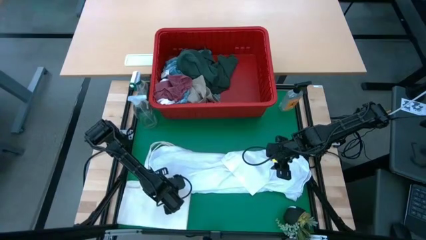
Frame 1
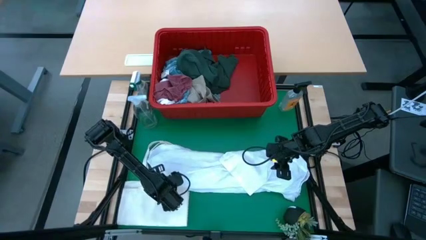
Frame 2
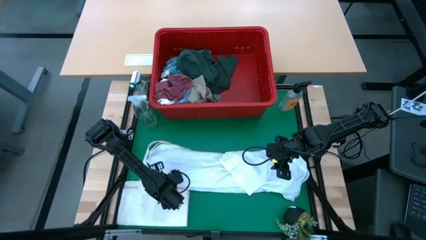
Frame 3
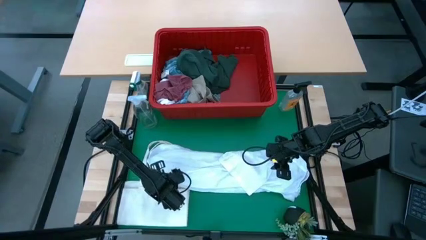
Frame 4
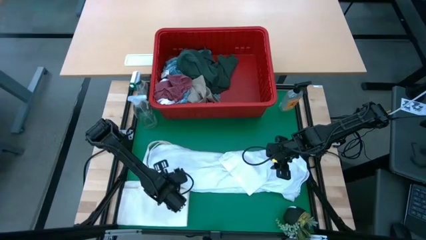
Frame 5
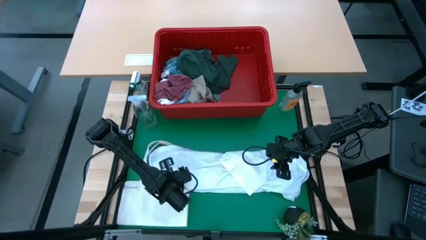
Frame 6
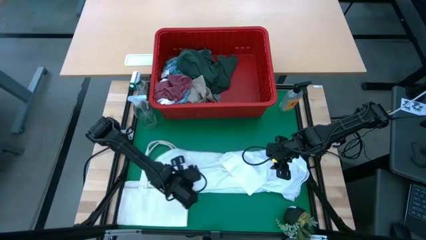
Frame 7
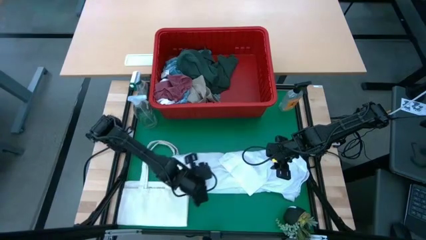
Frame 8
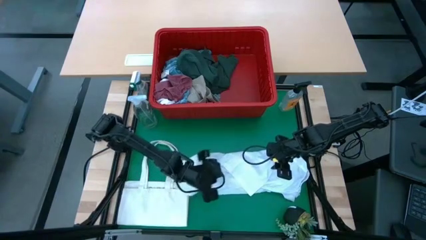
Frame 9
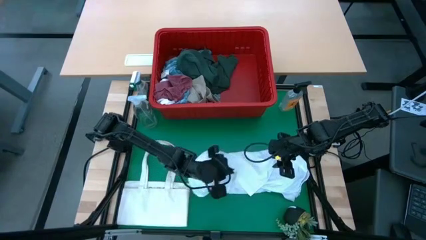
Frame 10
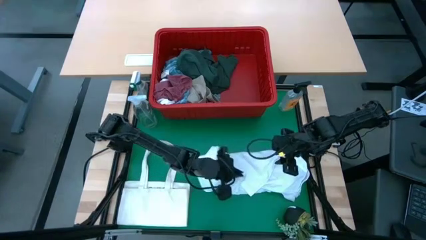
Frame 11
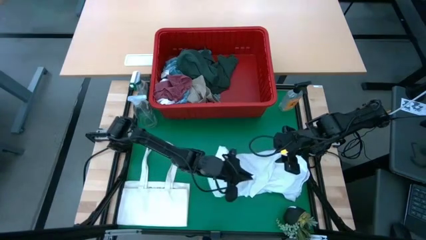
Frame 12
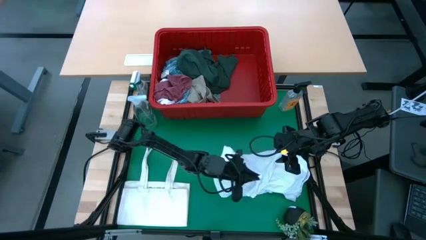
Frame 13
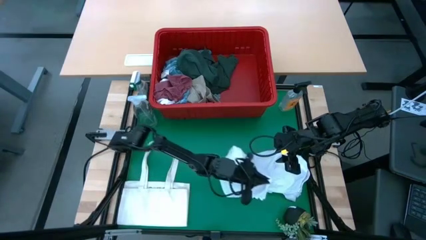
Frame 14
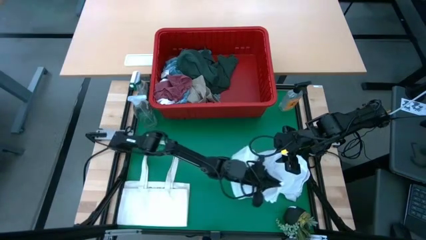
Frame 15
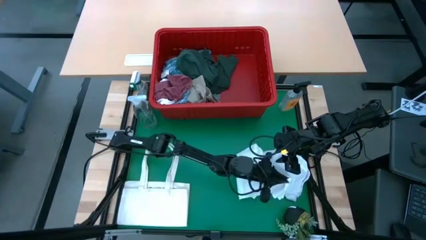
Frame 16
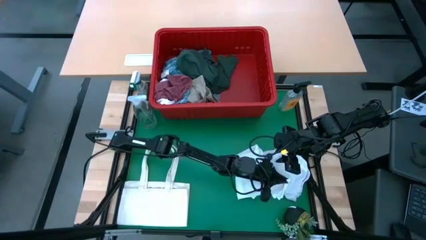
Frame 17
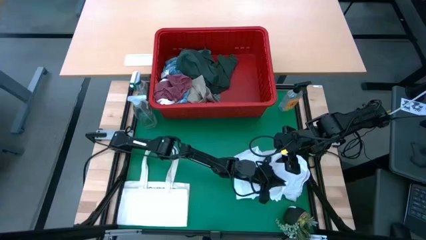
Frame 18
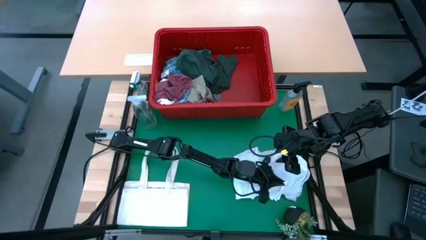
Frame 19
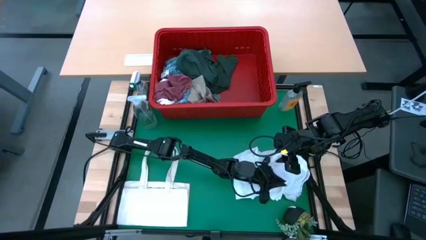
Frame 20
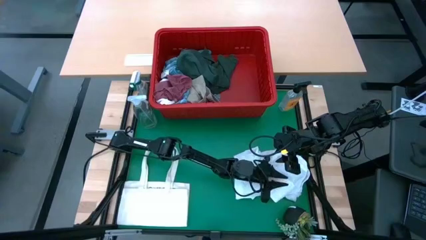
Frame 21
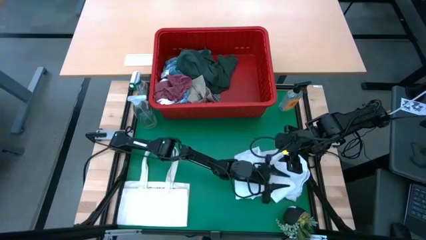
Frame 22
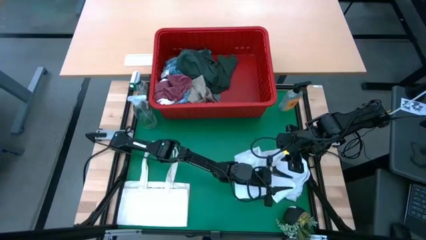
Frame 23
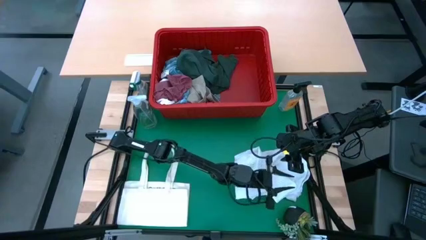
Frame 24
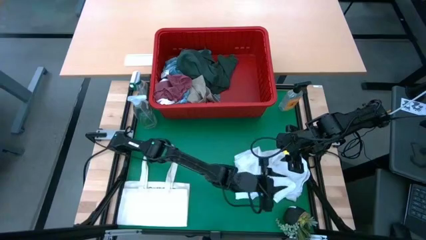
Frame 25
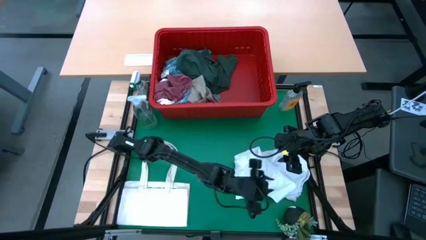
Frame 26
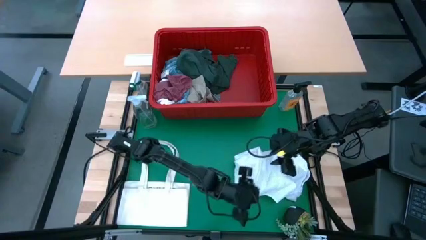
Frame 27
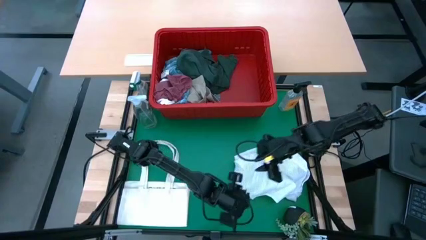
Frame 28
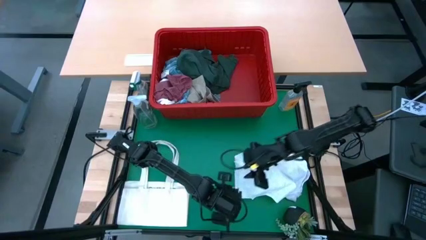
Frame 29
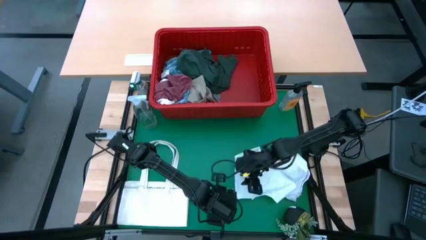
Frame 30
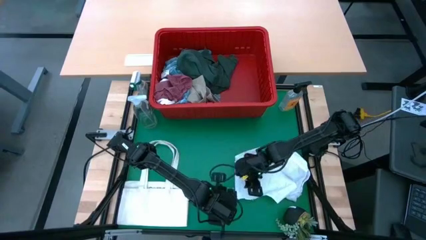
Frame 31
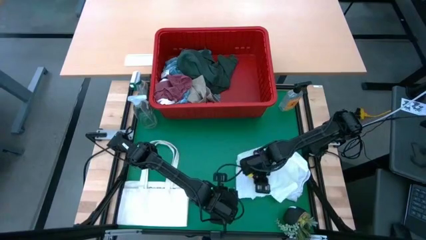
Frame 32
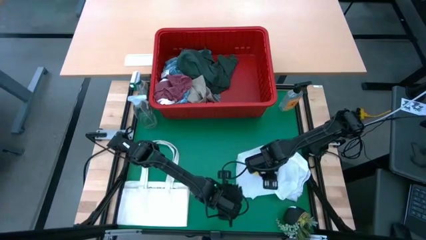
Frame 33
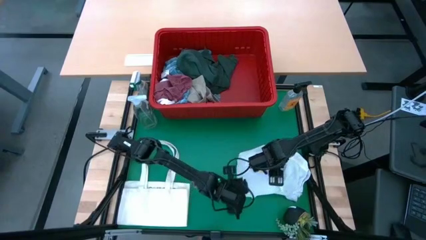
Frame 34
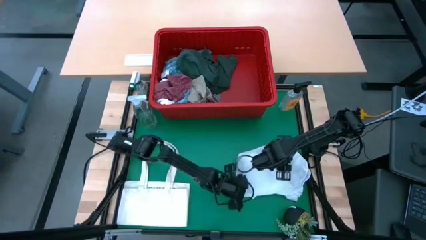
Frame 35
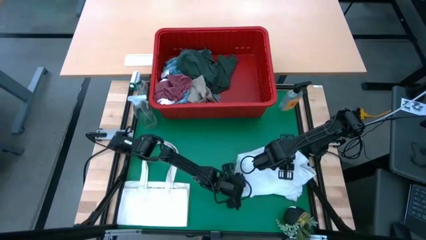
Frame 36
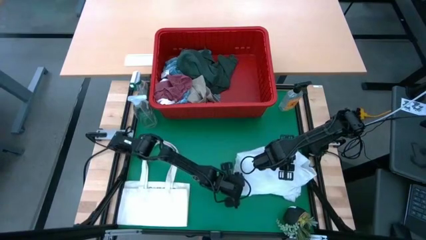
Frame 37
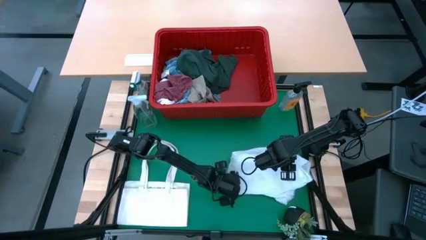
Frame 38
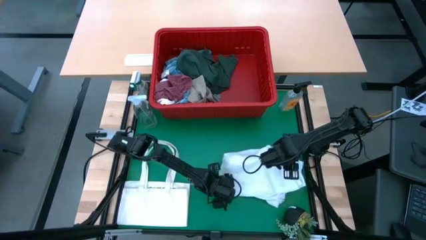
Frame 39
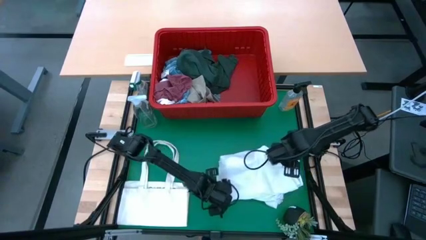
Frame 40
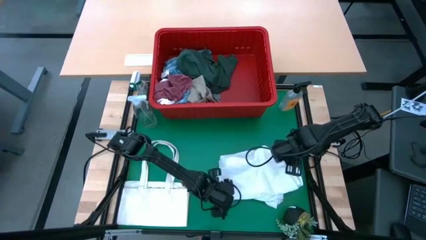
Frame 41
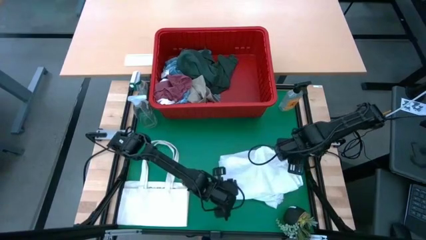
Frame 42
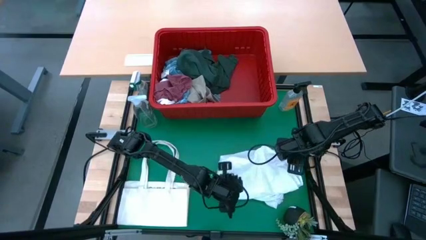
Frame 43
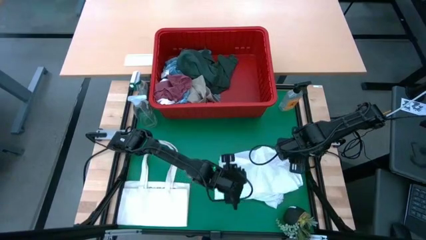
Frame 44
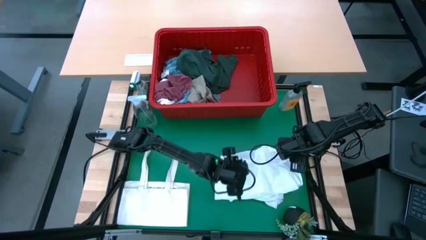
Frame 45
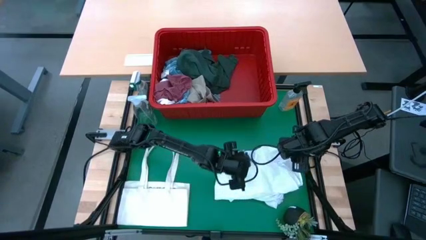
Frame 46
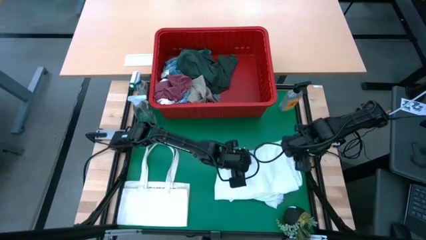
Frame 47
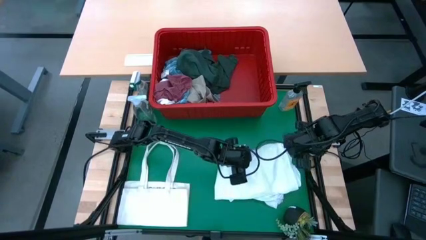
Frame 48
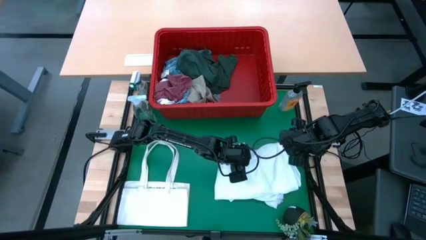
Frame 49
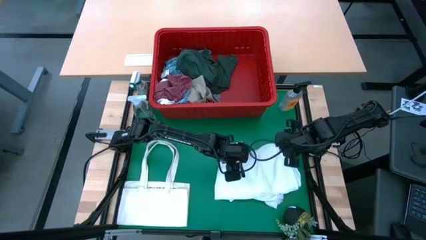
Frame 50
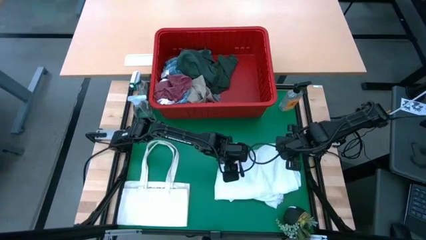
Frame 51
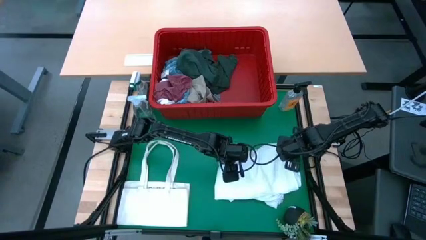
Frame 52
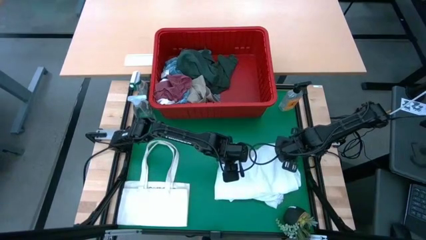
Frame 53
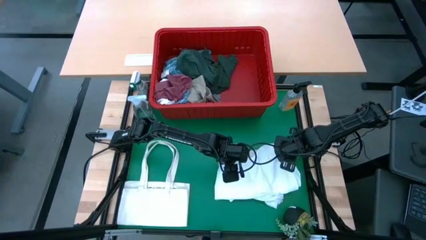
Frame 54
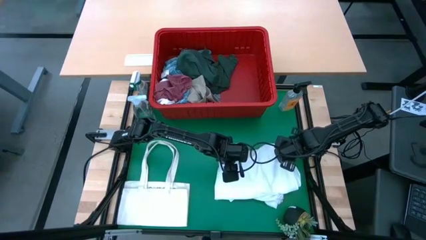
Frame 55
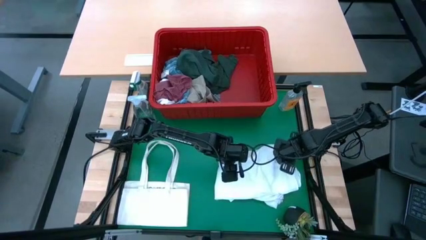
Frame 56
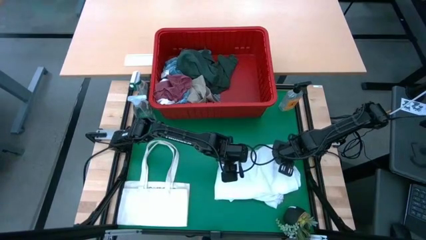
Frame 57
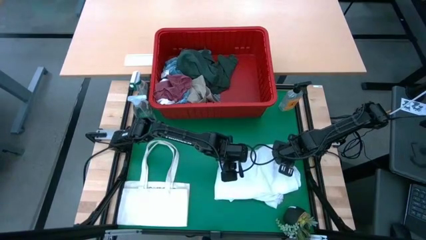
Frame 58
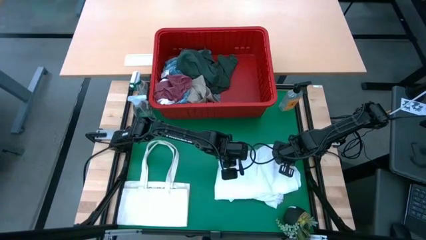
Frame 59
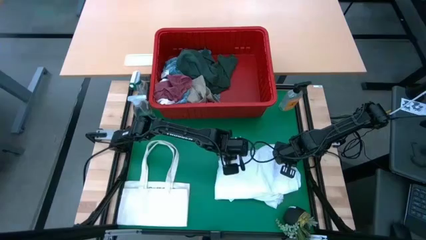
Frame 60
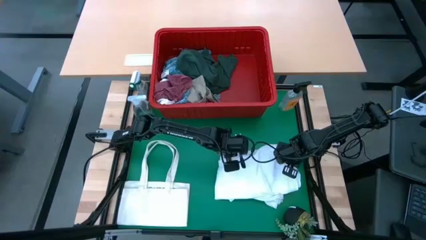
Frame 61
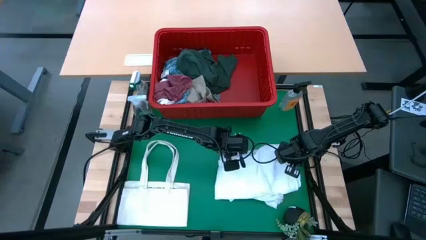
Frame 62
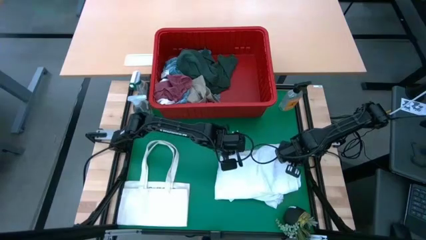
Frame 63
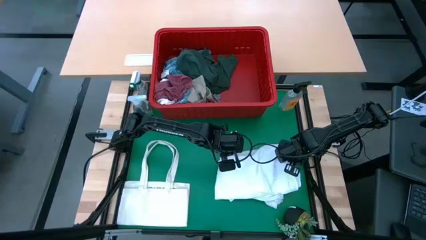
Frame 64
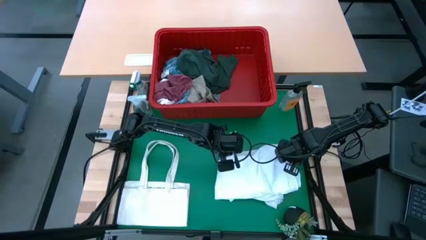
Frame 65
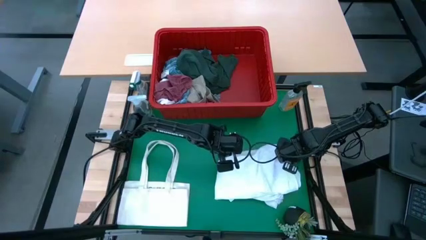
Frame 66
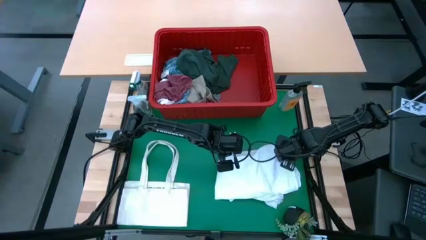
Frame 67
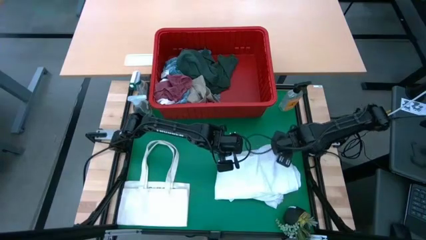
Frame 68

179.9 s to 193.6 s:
Task: Fold Laundry from Bin
Fold the white polo shirt
